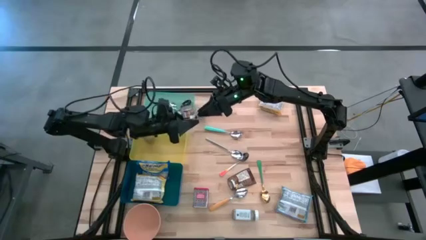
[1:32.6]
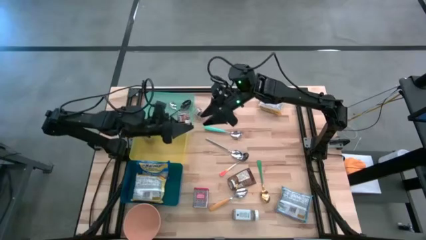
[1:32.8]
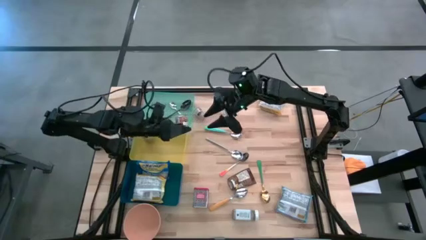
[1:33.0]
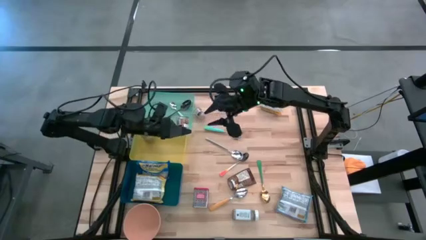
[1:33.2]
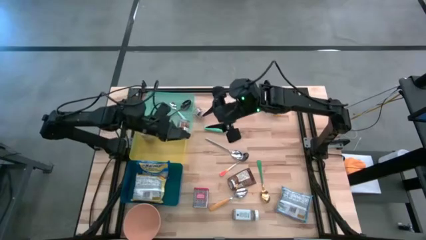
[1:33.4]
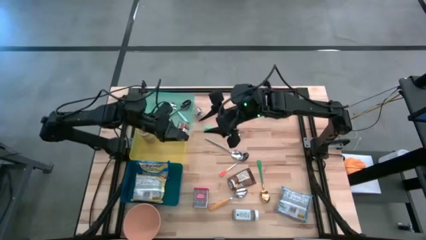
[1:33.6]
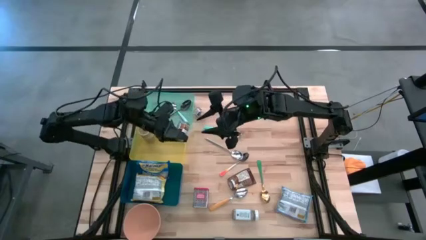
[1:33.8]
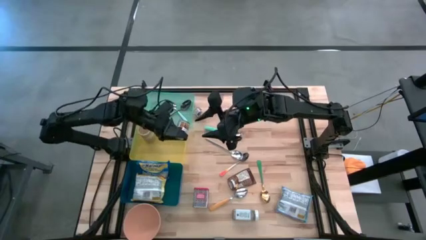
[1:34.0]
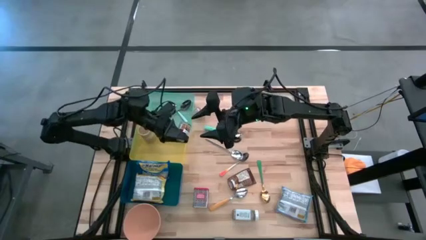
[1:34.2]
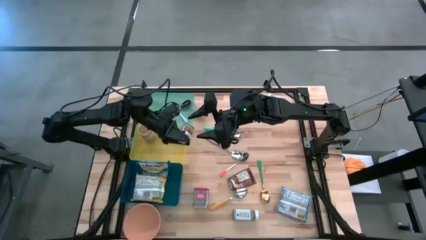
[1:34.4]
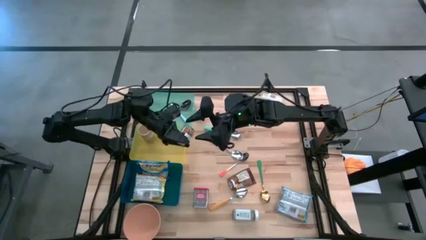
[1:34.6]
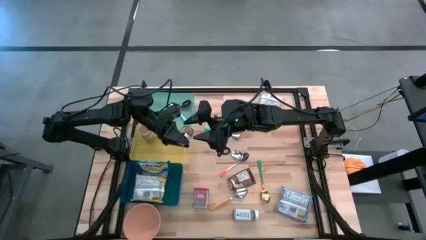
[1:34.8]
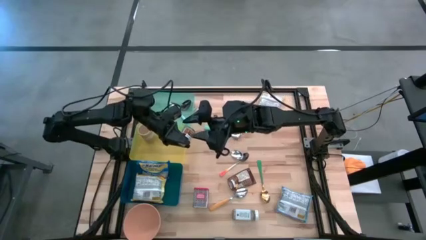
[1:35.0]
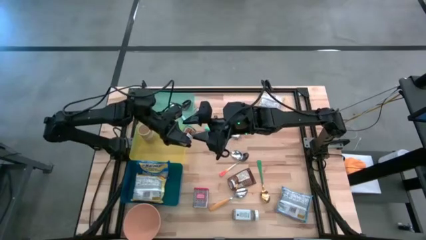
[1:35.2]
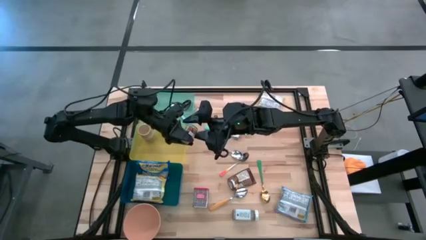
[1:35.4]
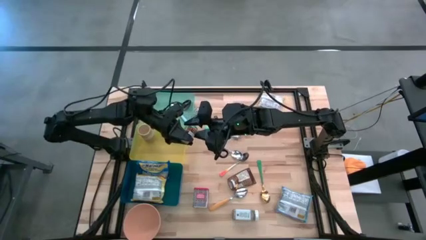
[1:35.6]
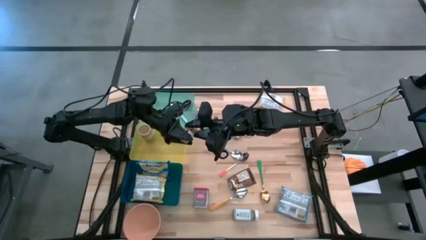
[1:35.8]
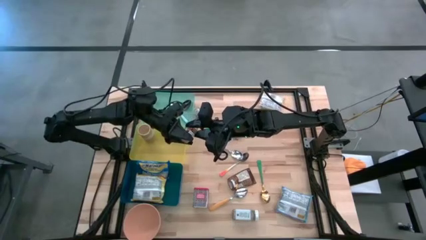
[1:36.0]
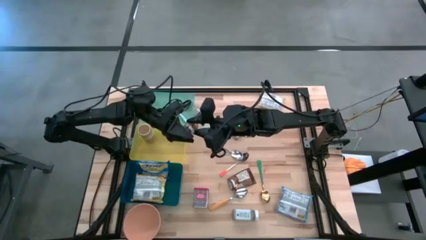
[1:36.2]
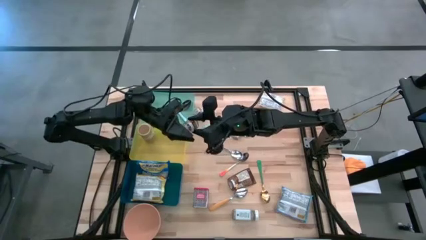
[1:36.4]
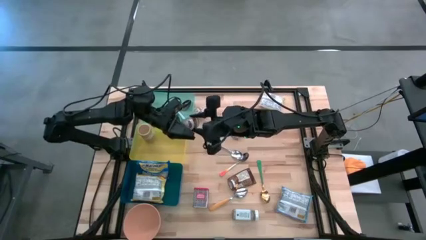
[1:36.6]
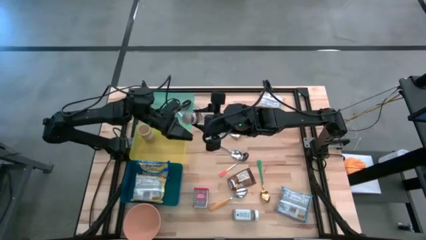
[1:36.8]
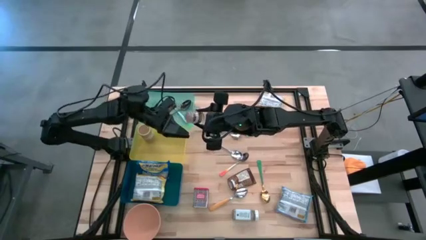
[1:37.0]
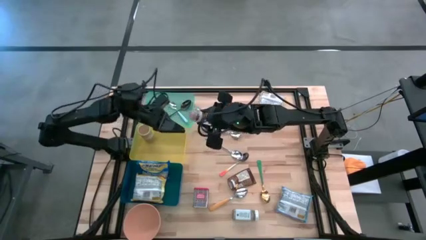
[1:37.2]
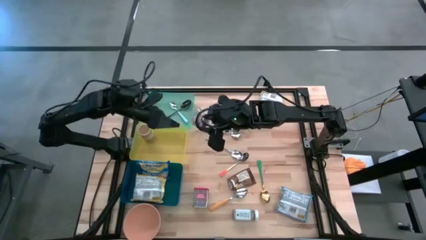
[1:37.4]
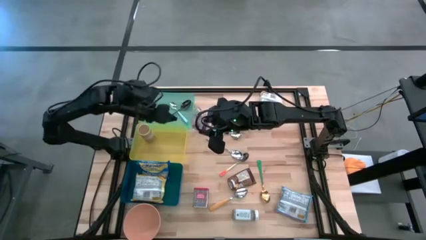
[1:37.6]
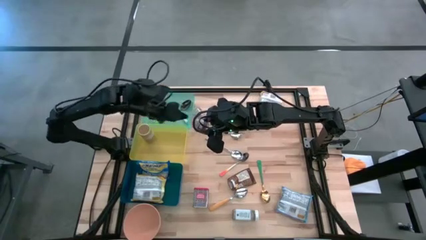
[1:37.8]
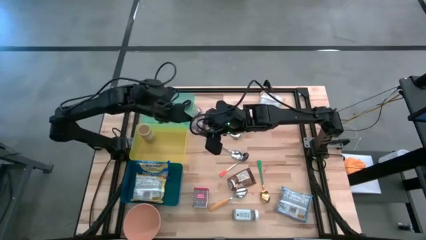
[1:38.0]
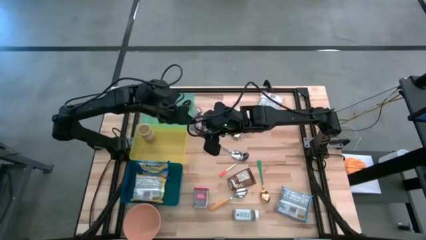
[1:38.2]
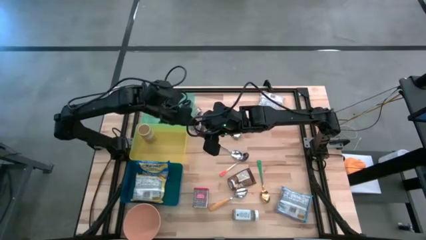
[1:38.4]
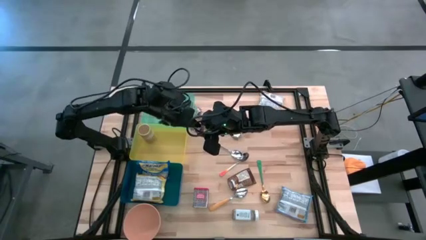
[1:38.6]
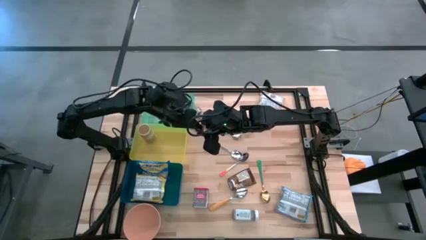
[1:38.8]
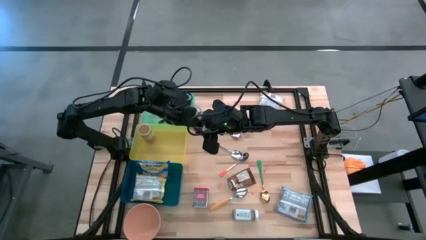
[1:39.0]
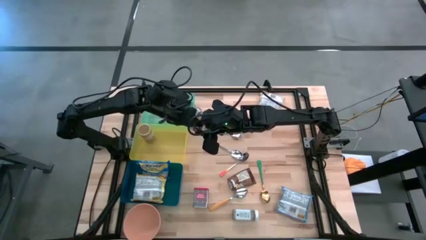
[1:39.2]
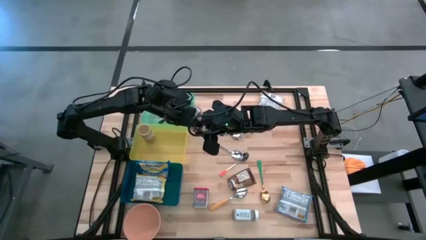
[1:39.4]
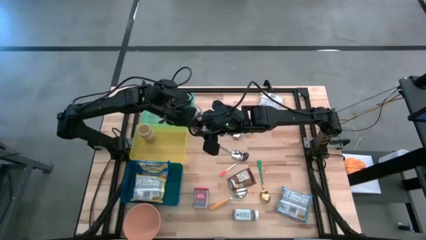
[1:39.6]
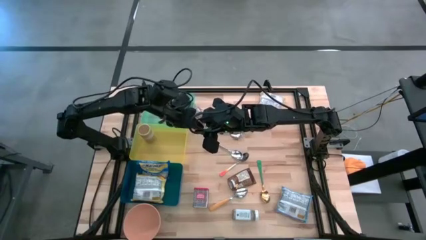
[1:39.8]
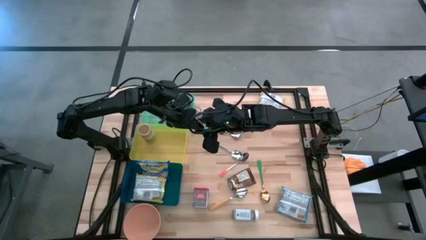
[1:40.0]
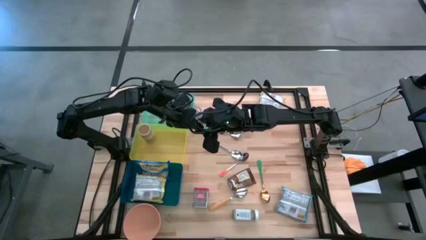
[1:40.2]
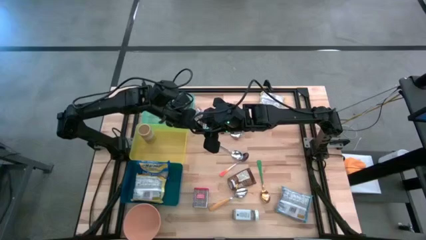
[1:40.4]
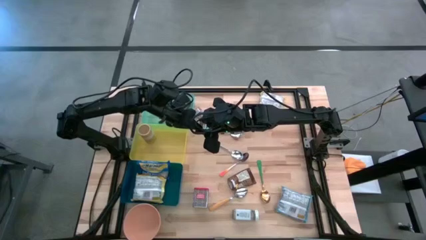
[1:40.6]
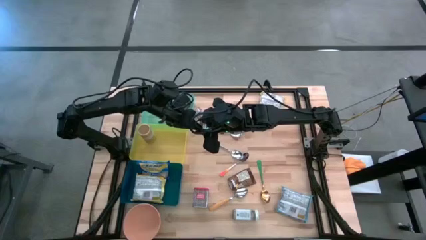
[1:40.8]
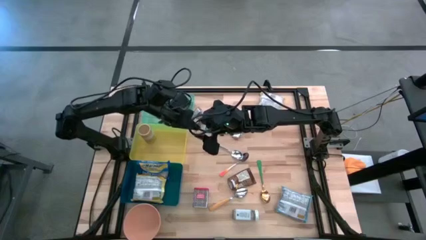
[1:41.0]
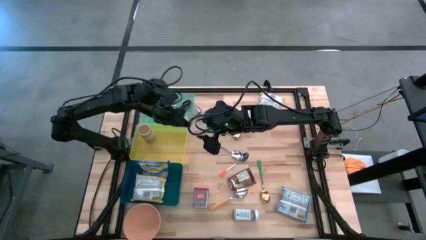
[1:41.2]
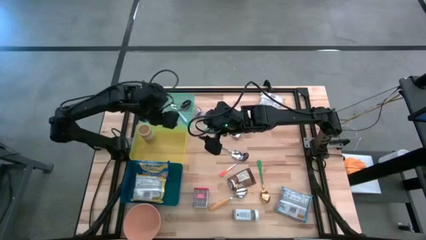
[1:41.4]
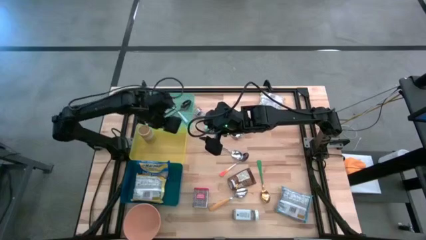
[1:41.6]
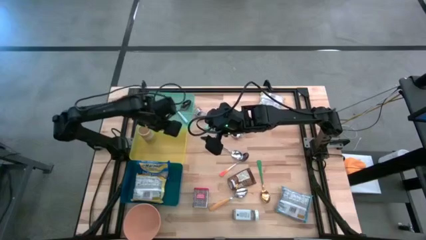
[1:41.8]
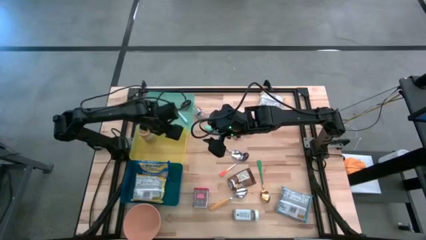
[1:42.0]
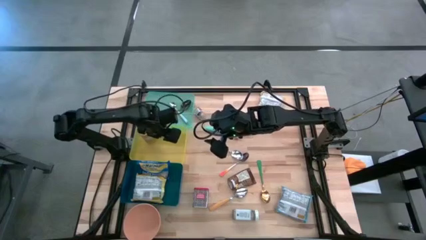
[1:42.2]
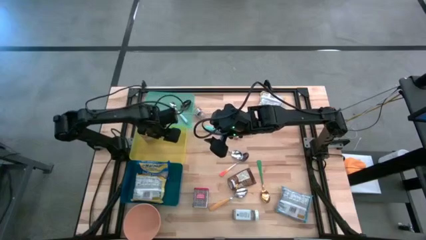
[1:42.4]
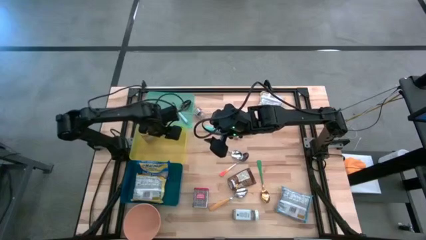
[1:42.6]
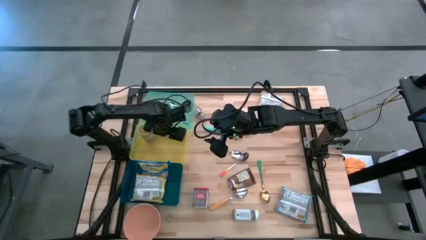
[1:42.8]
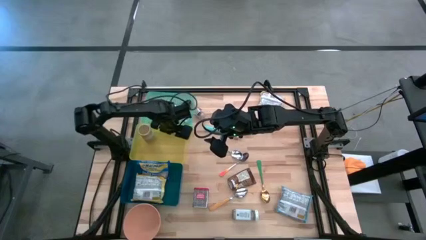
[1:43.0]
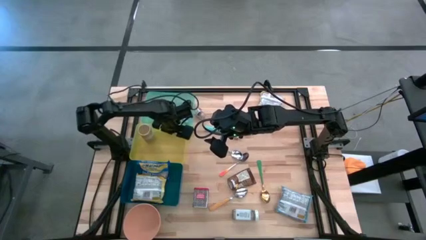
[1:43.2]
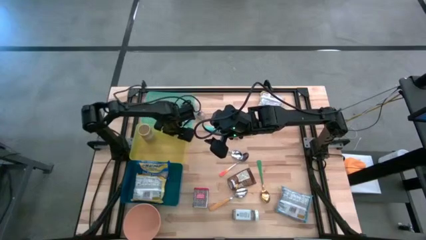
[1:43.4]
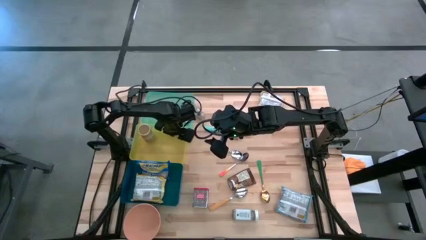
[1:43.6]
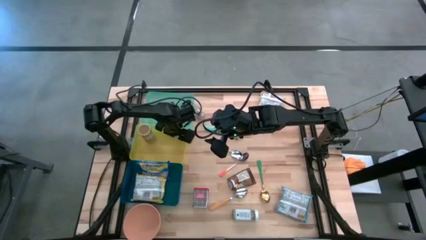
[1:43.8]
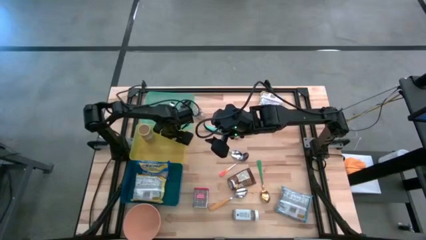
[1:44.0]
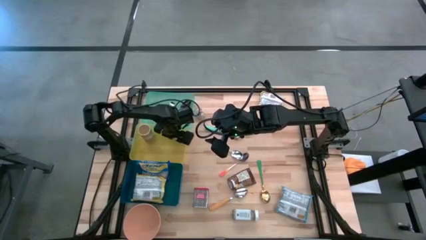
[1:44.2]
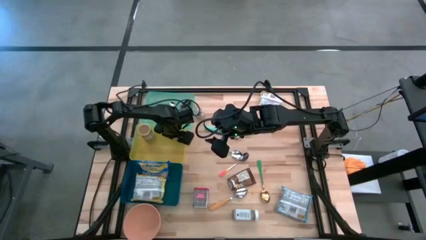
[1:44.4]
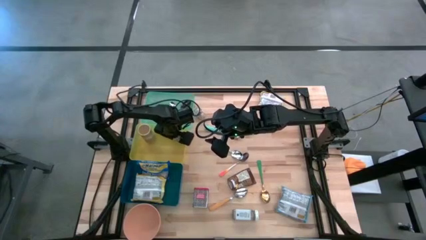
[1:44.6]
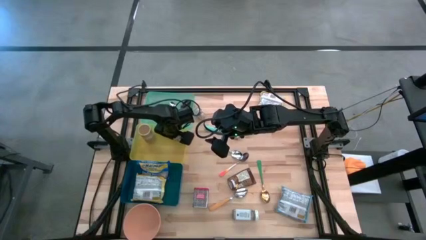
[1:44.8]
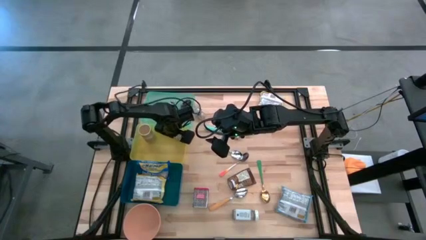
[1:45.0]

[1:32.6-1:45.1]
Put the right brown seasoning bottle into the yellow bin
